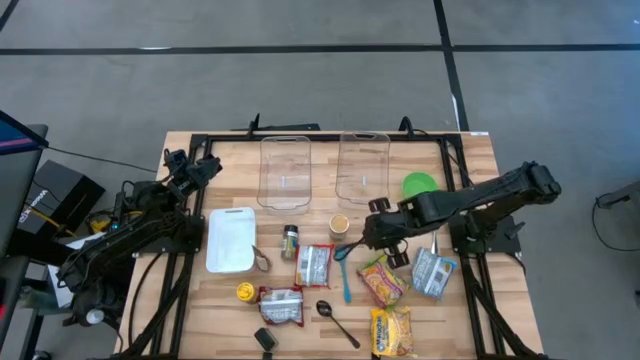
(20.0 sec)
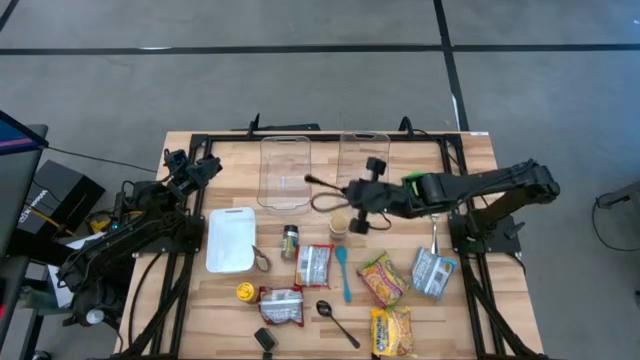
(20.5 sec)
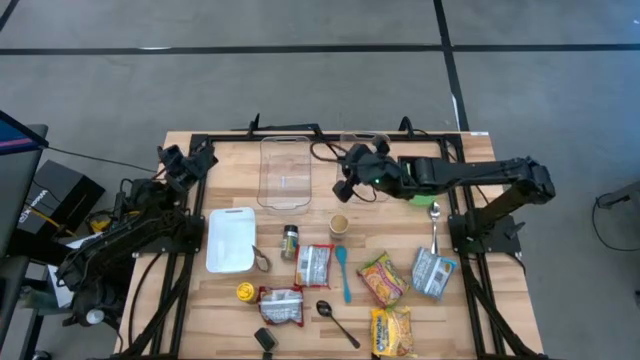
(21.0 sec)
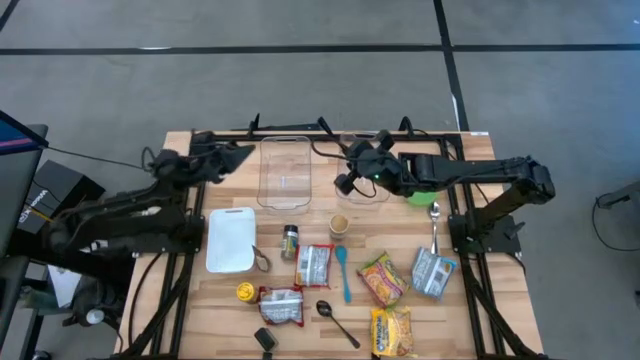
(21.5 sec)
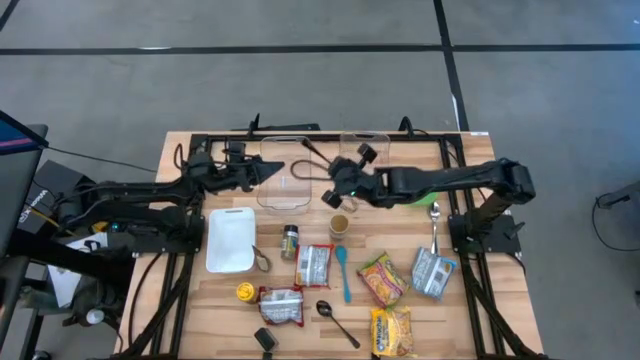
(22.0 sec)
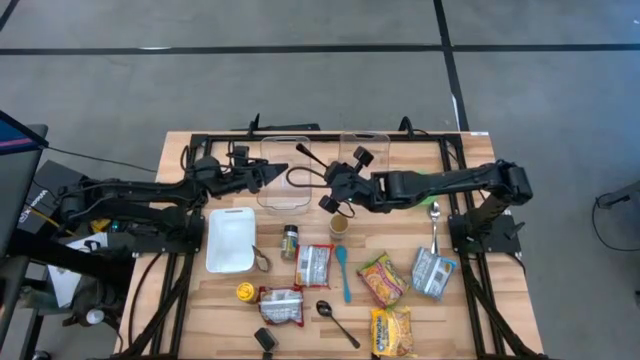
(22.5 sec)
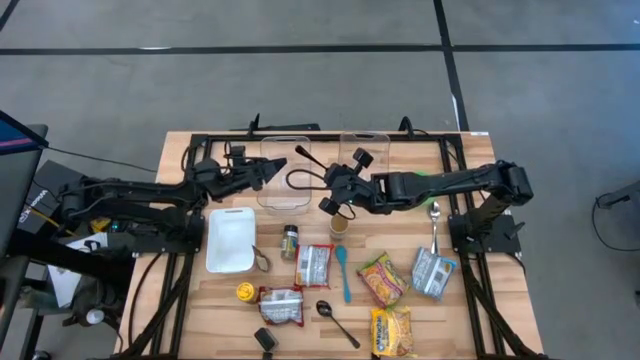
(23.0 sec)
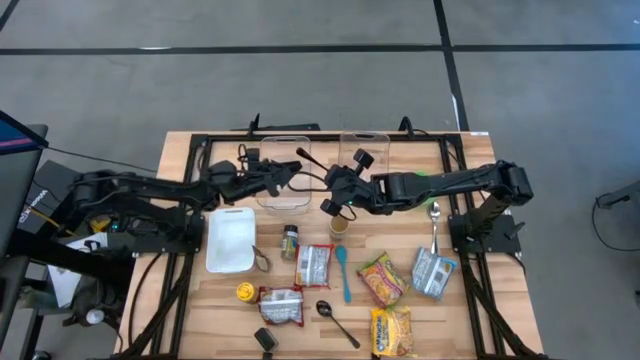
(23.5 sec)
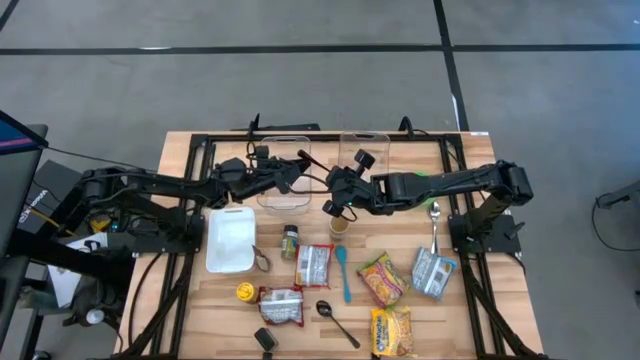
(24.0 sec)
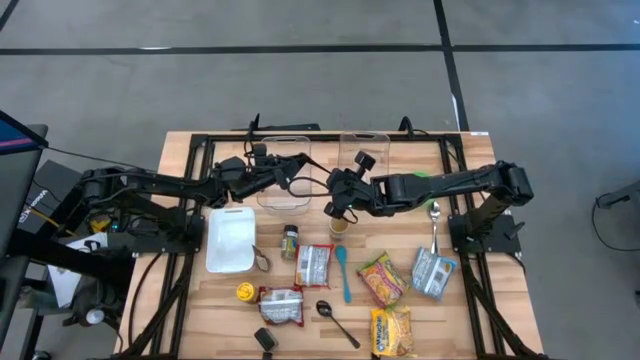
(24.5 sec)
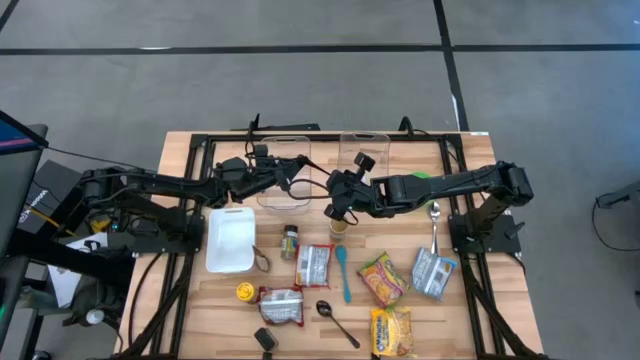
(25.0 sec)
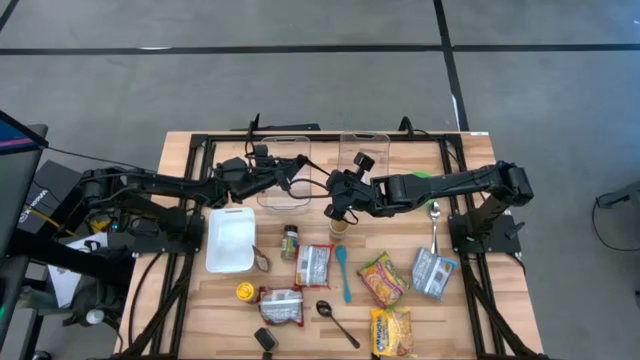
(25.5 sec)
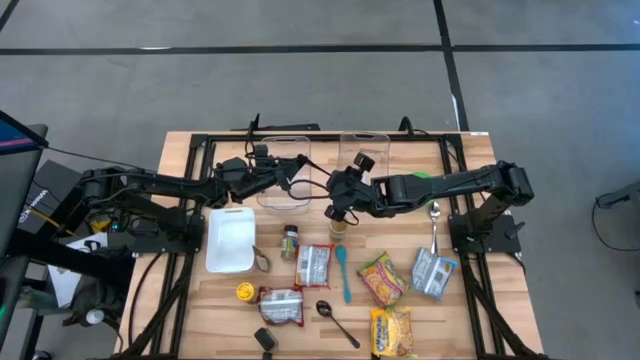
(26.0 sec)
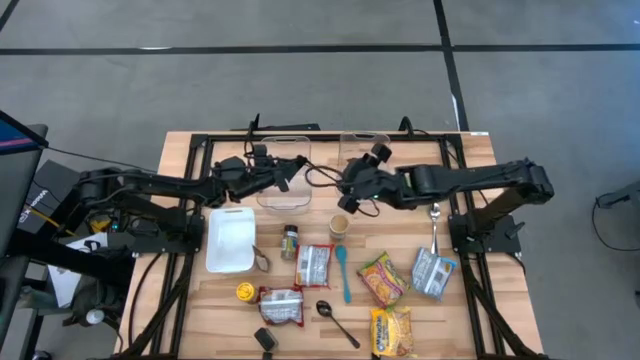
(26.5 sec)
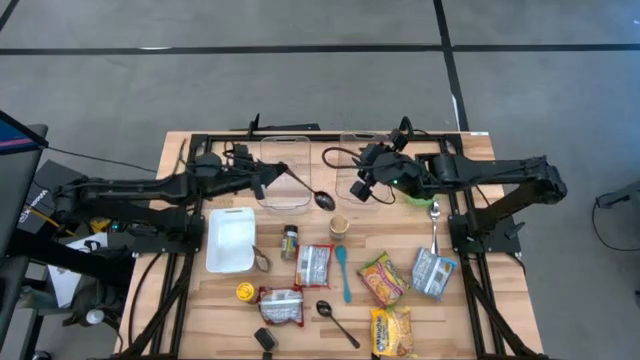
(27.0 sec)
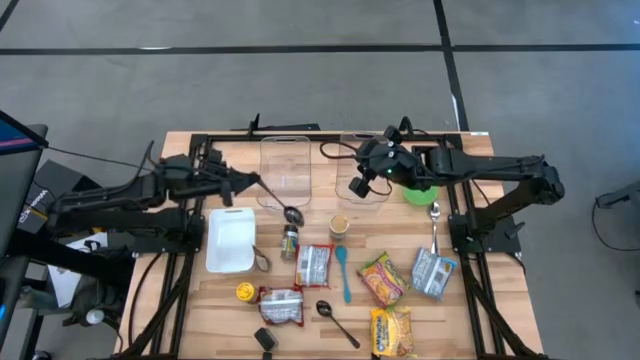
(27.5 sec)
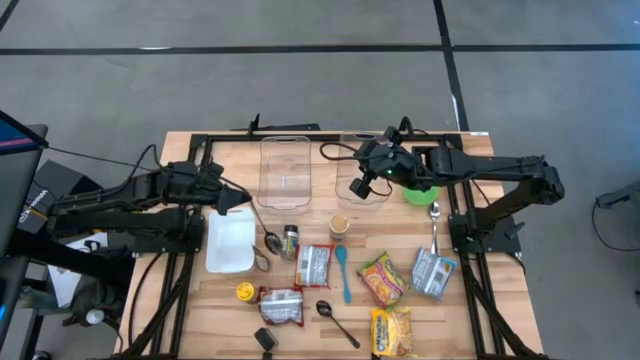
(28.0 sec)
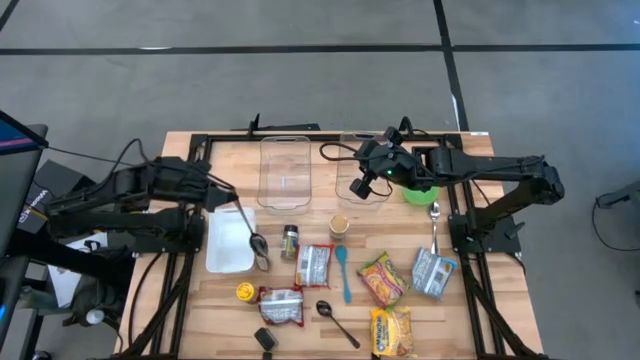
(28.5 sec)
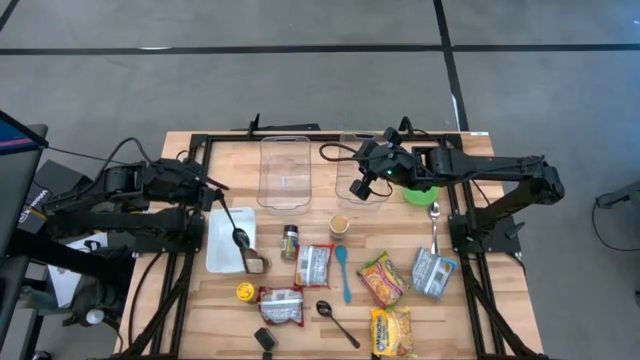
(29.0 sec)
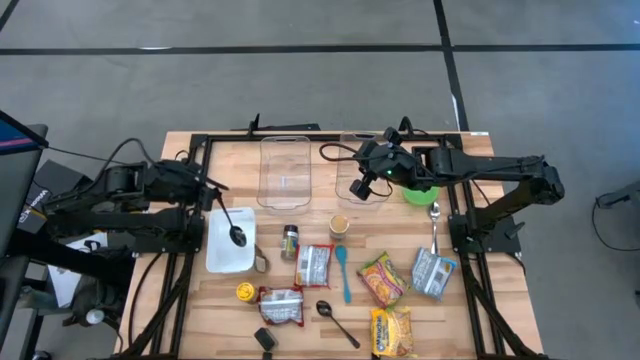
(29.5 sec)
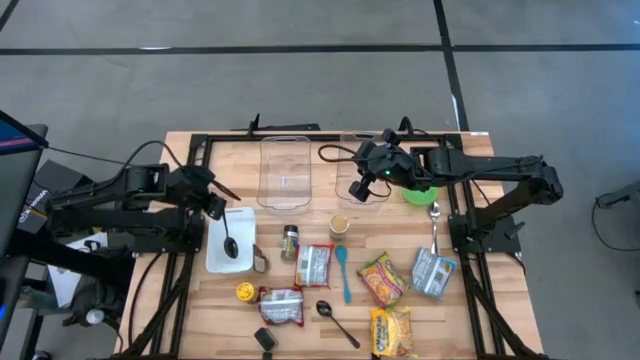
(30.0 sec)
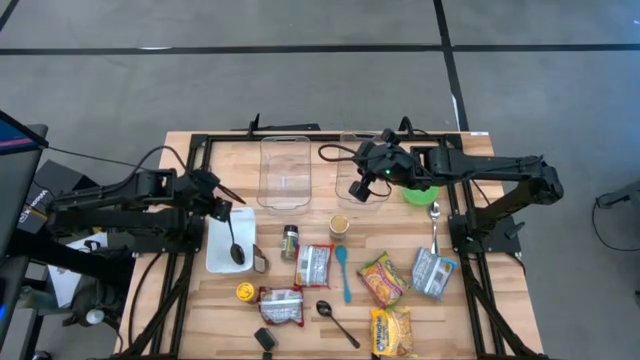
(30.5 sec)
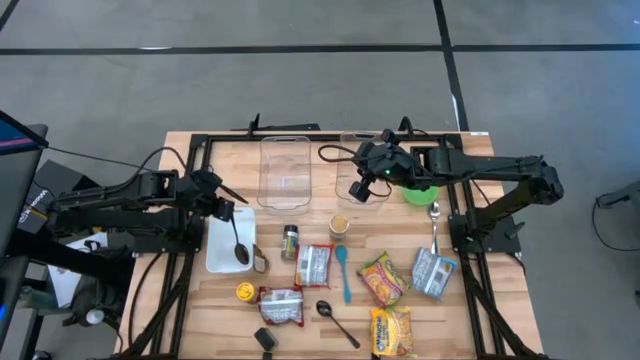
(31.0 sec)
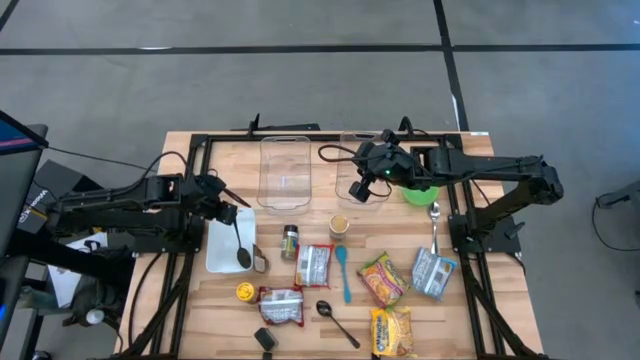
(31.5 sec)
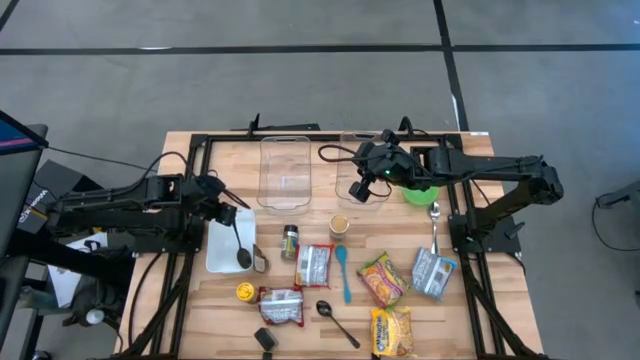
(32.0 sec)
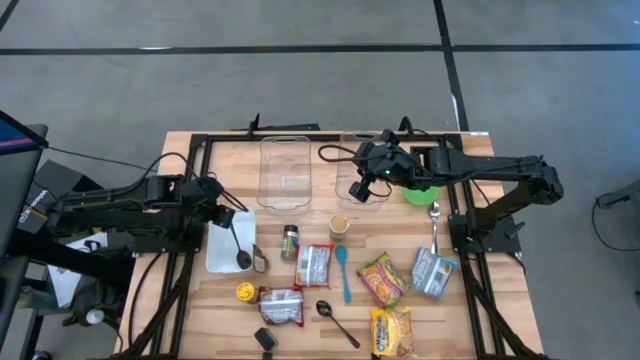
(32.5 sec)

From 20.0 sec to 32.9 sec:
Task: Pick & Place Food Item
Put the top black spoon into the white bin

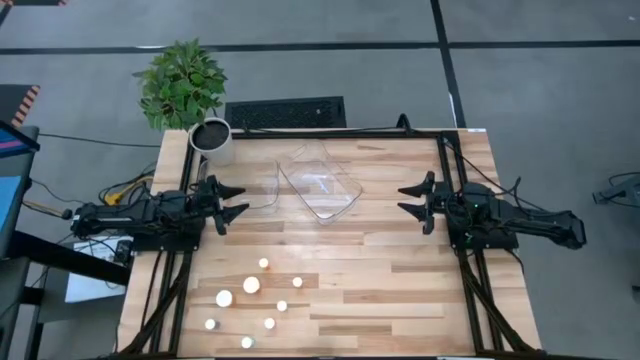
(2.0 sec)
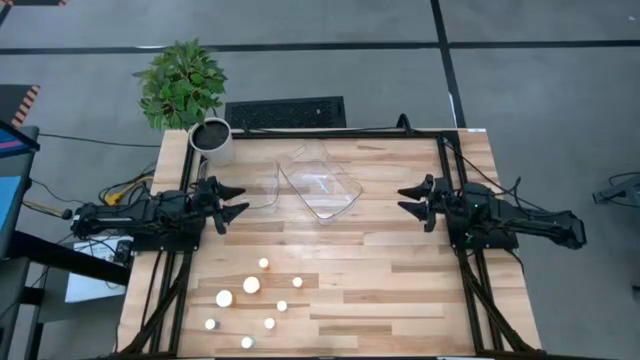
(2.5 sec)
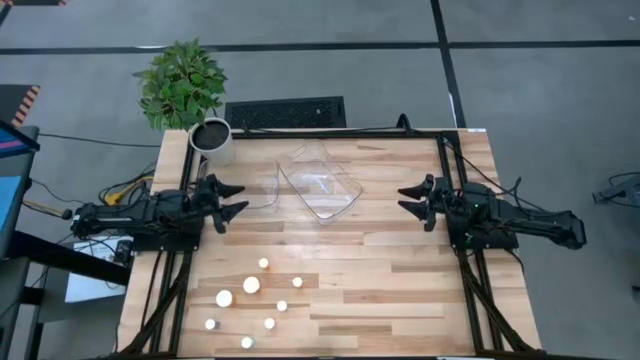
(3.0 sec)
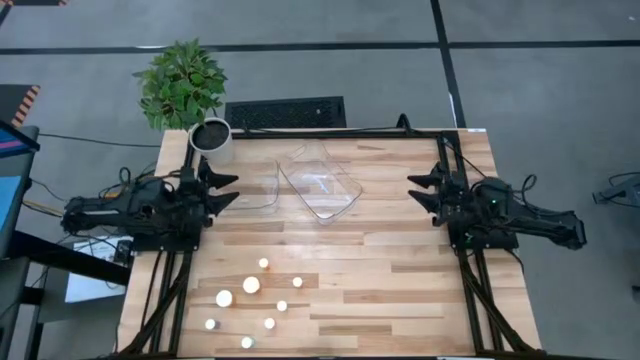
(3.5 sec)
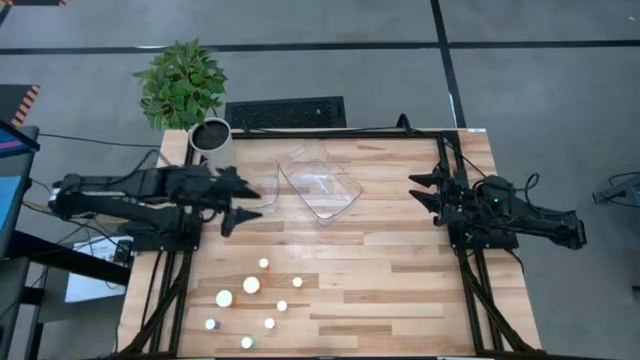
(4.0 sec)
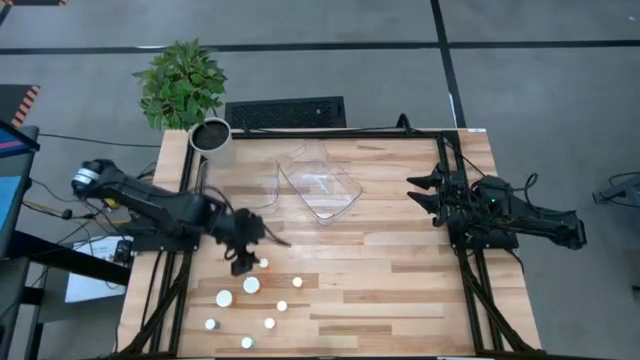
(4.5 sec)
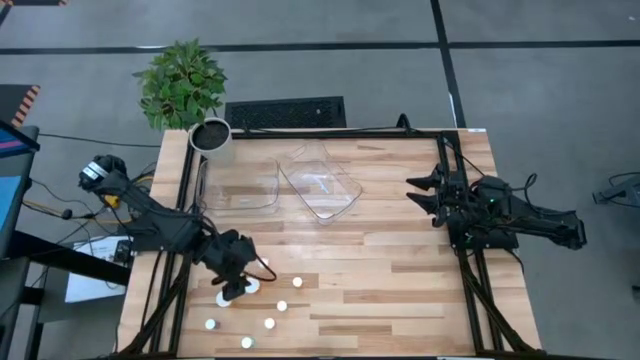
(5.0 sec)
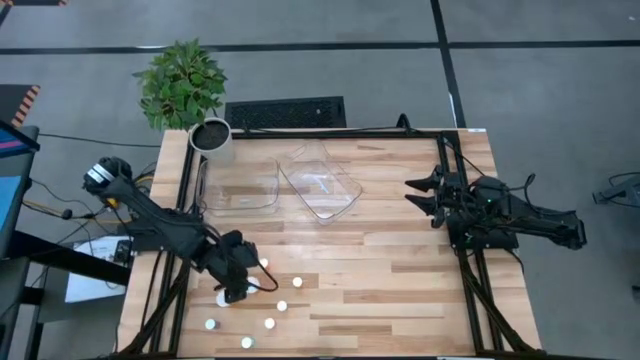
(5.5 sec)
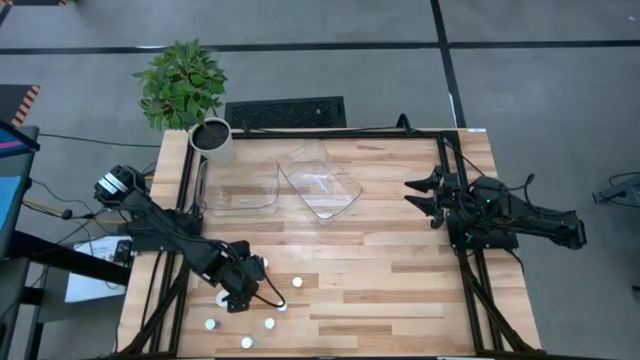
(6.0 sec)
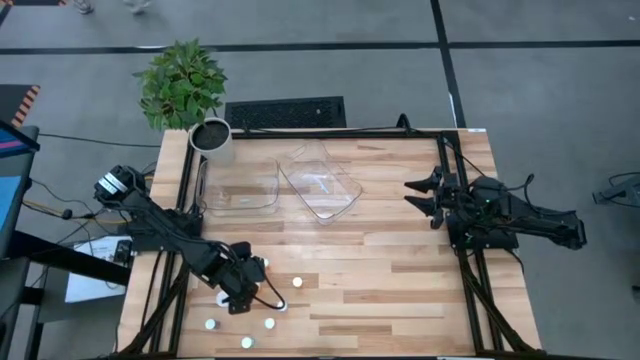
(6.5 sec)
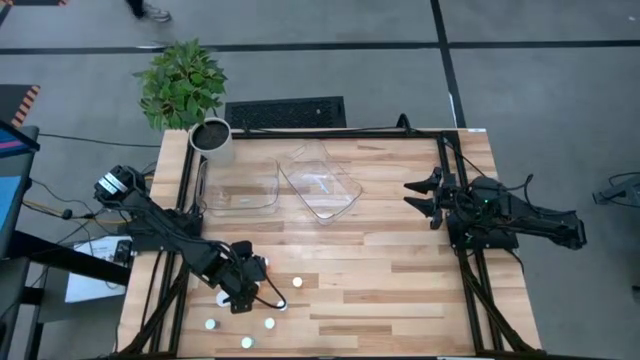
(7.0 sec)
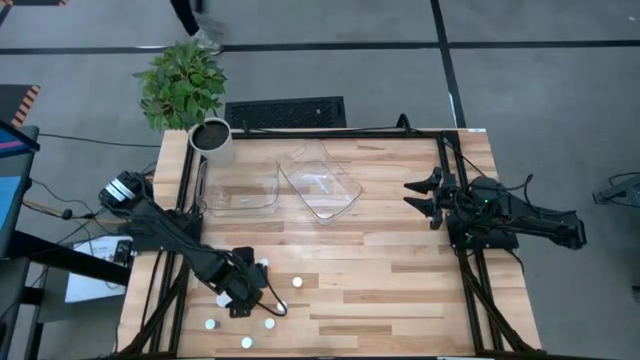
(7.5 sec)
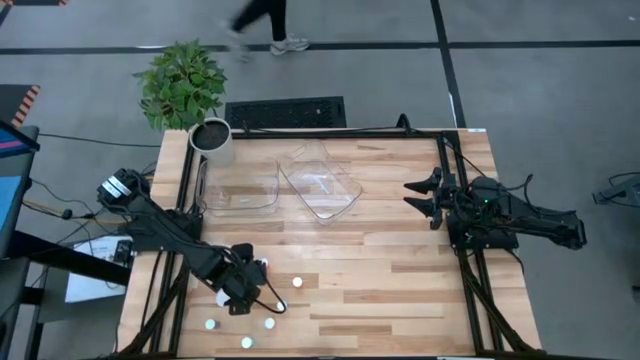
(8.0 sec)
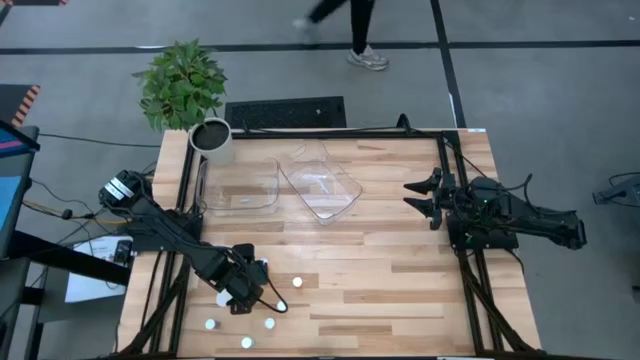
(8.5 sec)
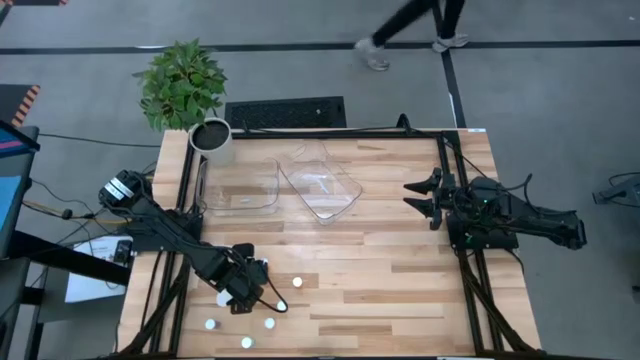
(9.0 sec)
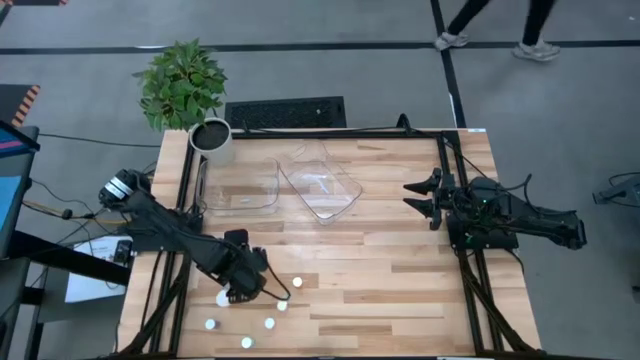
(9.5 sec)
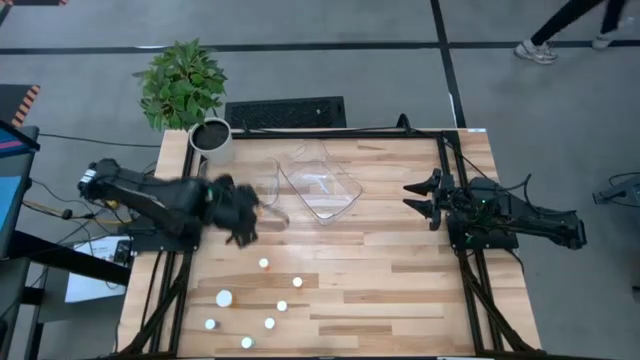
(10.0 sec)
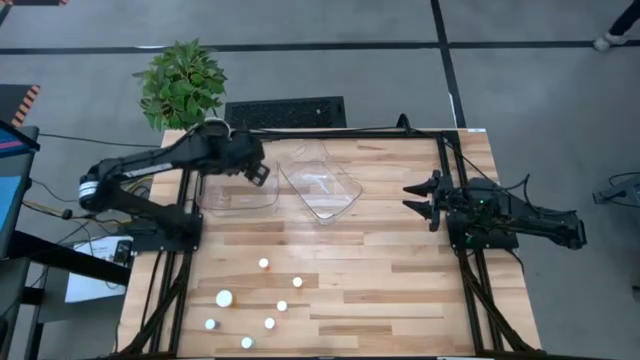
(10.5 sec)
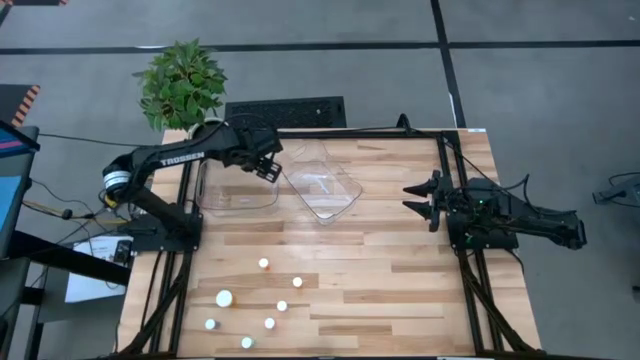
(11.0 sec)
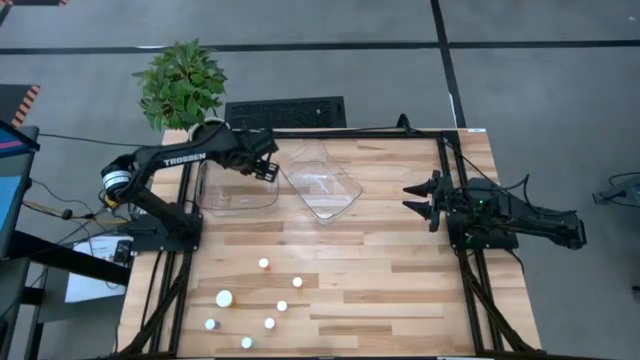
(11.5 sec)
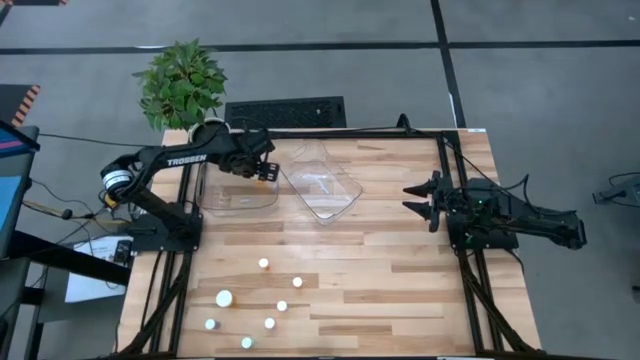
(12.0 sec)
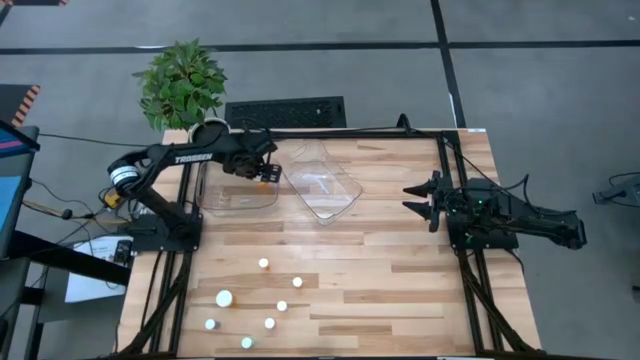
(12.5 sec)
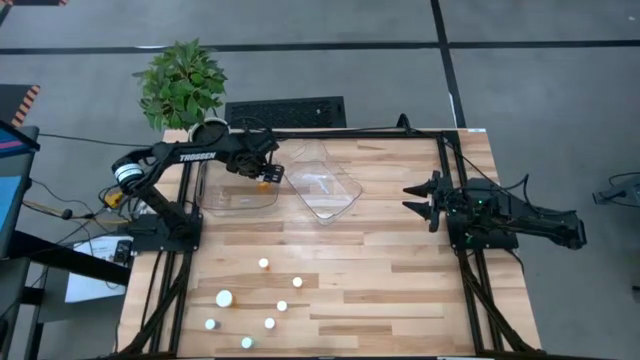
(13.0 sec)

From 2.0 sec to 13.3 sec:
Task: Pick and place medicine bottles into bin by pill shape (circle, oval)
Put the top large orange capsule bottle into the left transparent bin
